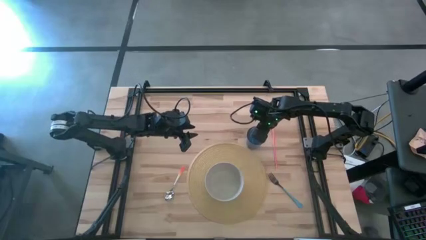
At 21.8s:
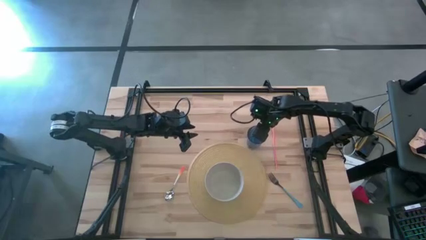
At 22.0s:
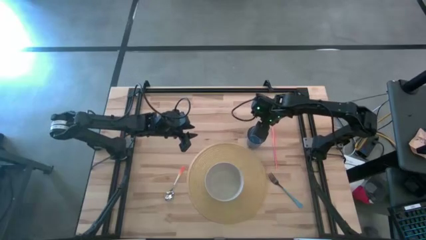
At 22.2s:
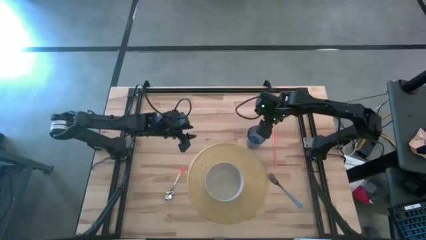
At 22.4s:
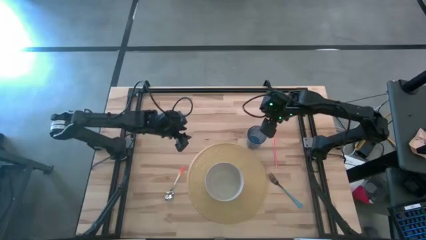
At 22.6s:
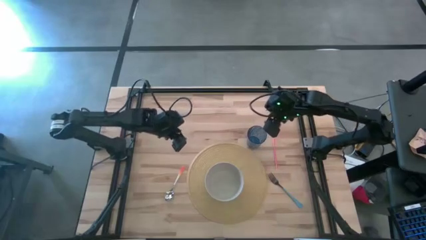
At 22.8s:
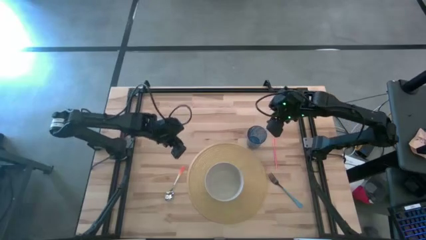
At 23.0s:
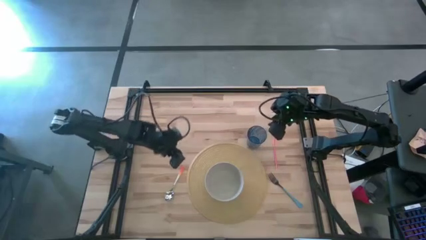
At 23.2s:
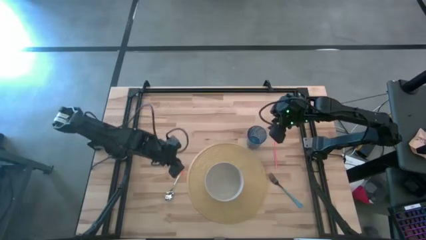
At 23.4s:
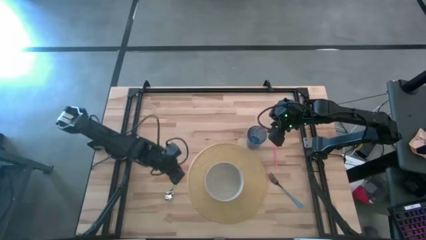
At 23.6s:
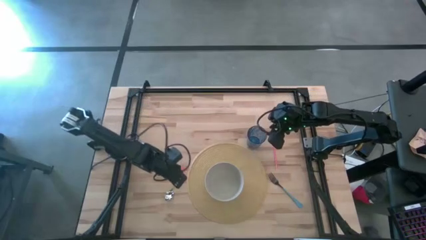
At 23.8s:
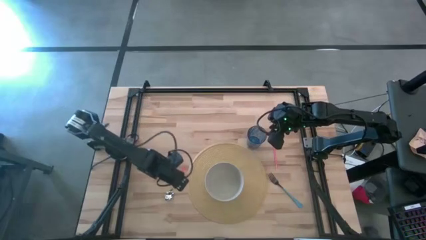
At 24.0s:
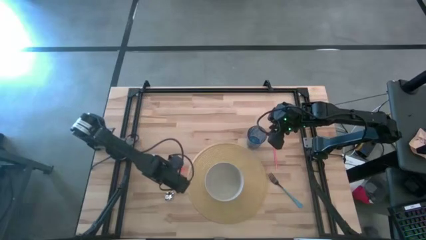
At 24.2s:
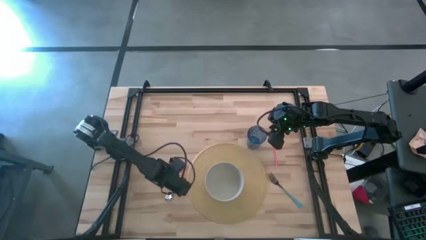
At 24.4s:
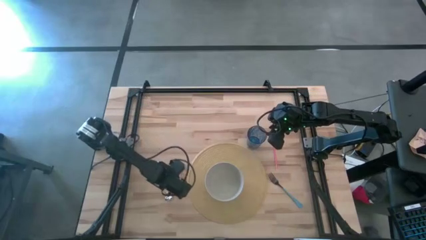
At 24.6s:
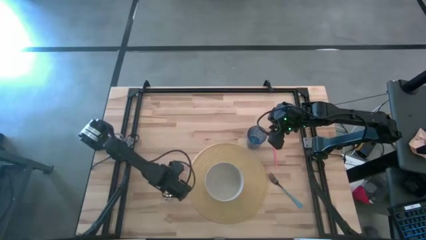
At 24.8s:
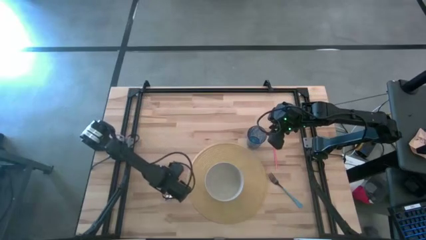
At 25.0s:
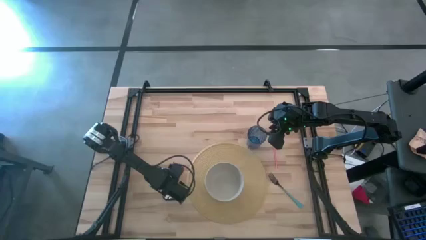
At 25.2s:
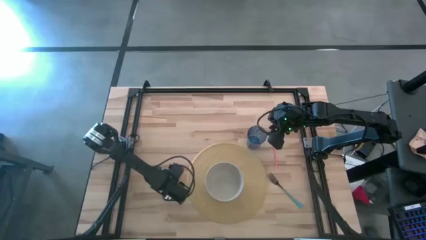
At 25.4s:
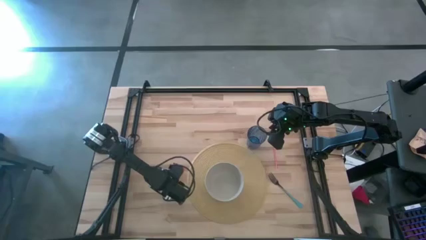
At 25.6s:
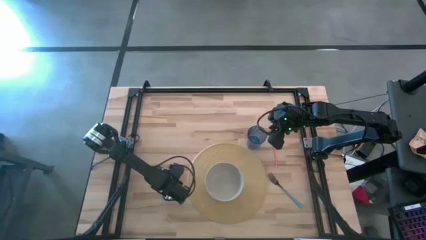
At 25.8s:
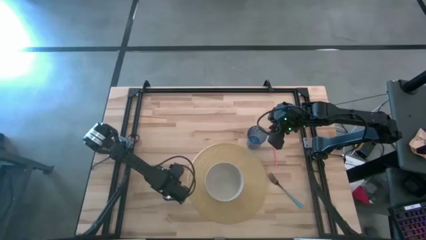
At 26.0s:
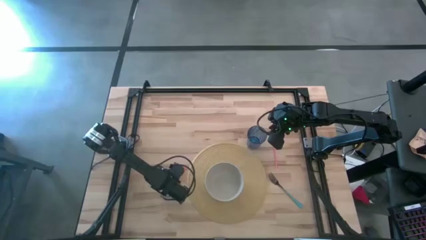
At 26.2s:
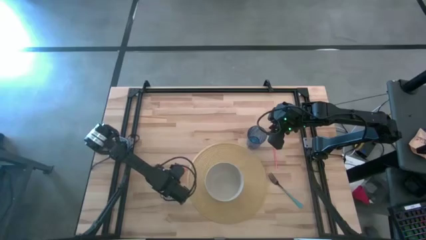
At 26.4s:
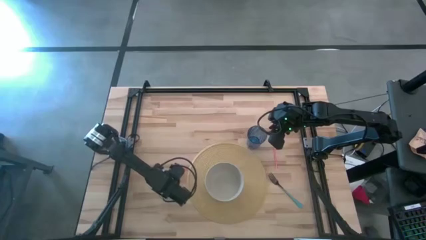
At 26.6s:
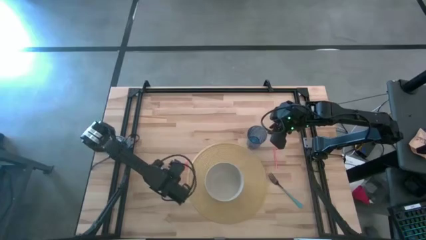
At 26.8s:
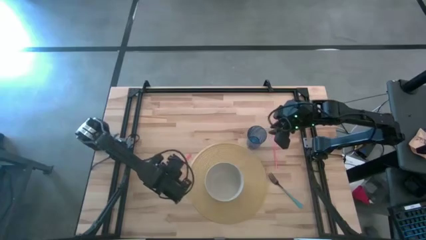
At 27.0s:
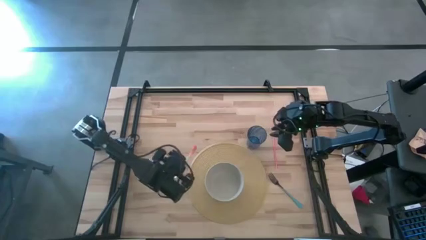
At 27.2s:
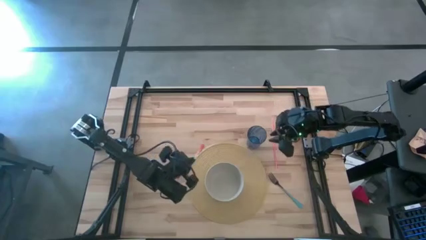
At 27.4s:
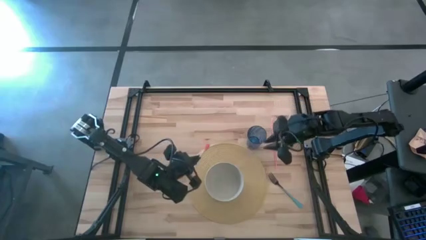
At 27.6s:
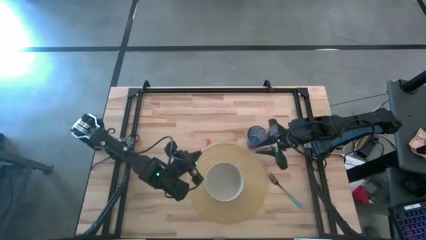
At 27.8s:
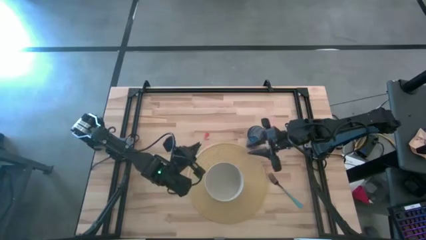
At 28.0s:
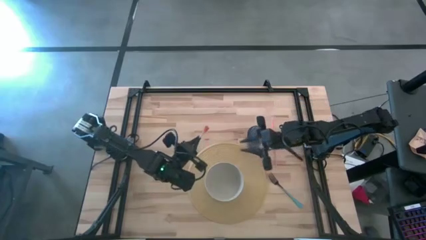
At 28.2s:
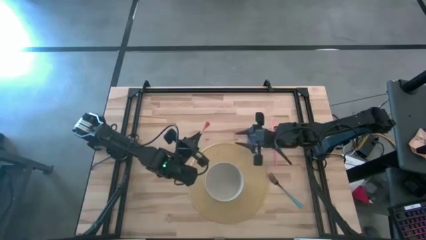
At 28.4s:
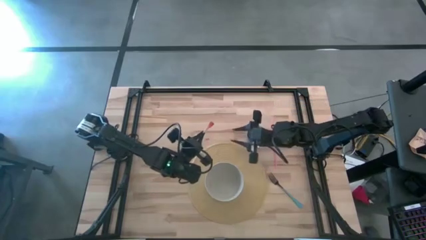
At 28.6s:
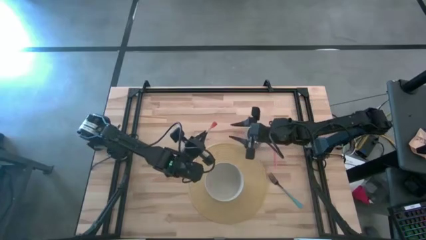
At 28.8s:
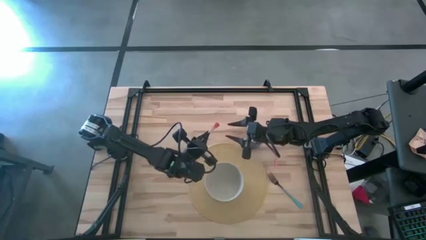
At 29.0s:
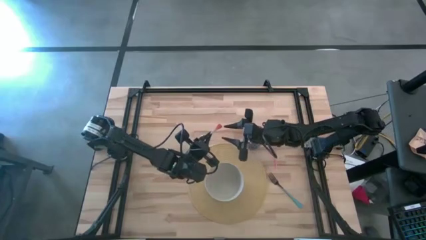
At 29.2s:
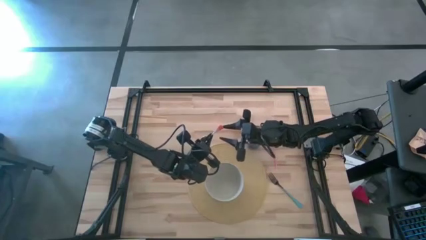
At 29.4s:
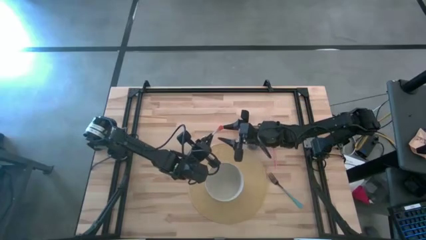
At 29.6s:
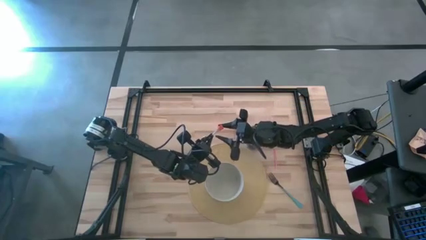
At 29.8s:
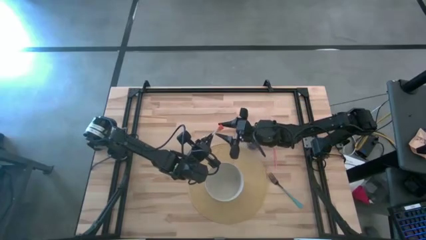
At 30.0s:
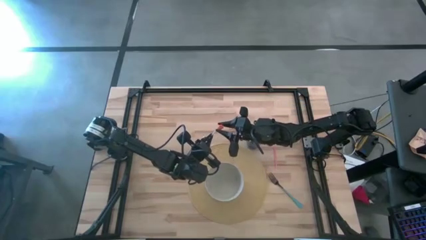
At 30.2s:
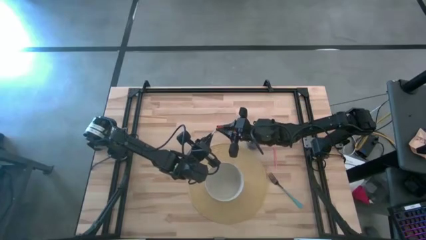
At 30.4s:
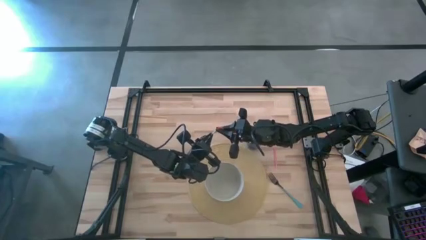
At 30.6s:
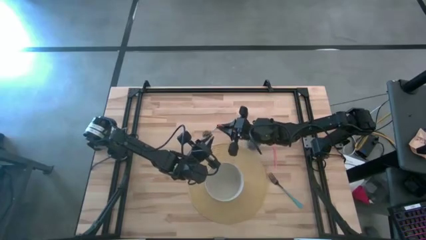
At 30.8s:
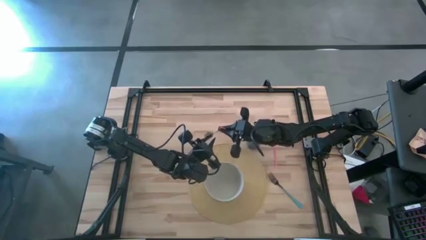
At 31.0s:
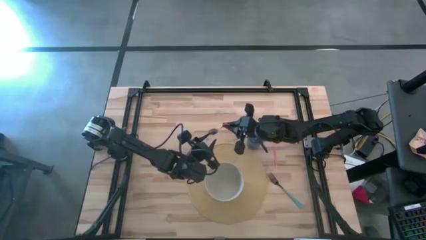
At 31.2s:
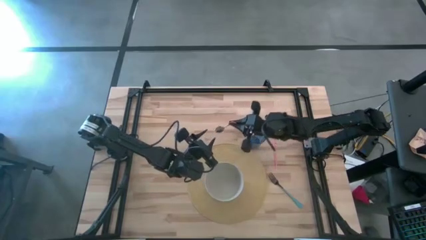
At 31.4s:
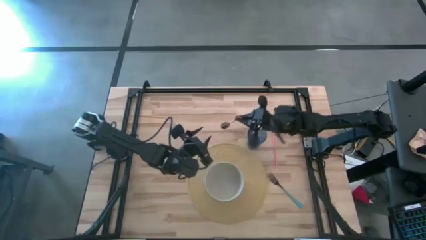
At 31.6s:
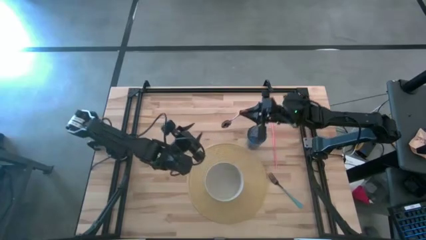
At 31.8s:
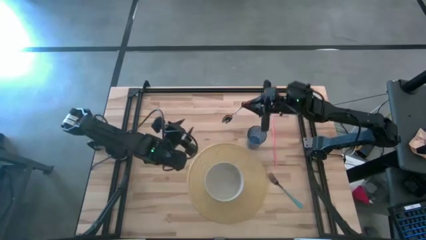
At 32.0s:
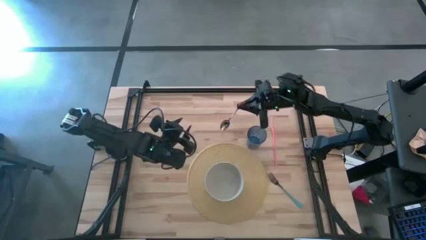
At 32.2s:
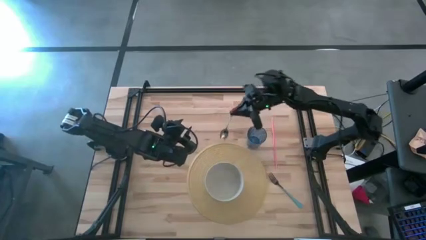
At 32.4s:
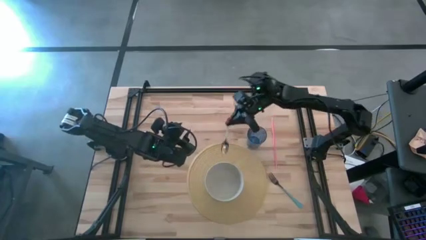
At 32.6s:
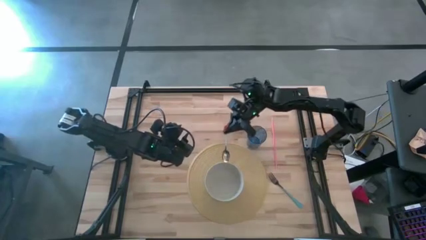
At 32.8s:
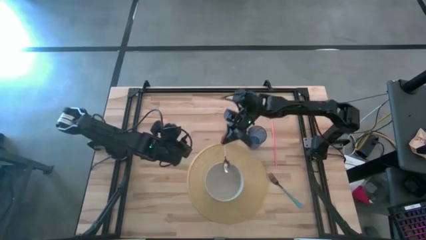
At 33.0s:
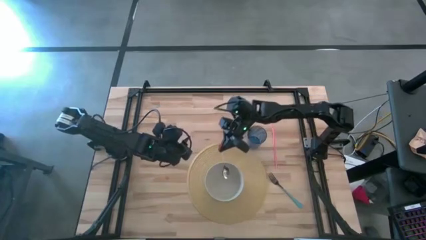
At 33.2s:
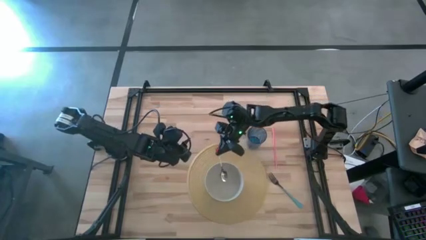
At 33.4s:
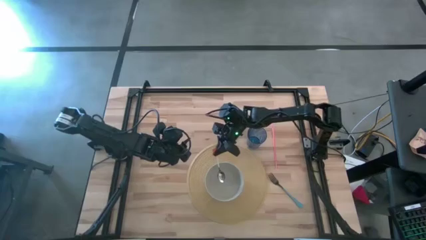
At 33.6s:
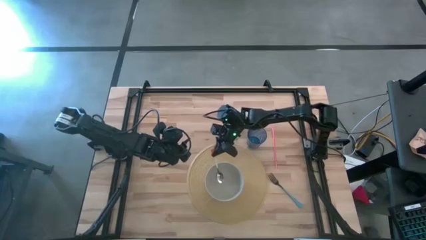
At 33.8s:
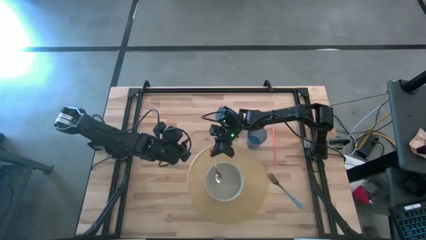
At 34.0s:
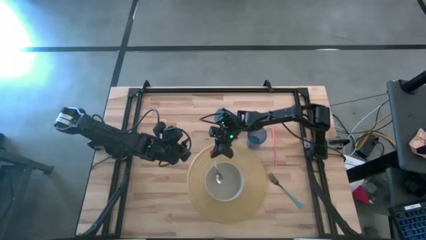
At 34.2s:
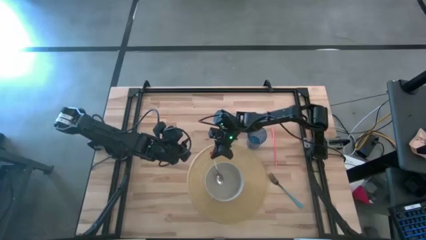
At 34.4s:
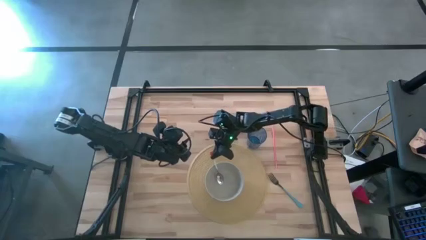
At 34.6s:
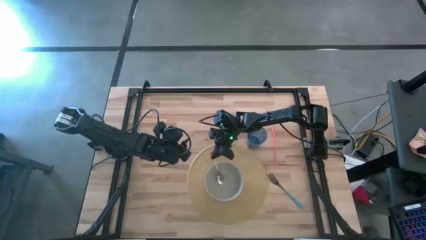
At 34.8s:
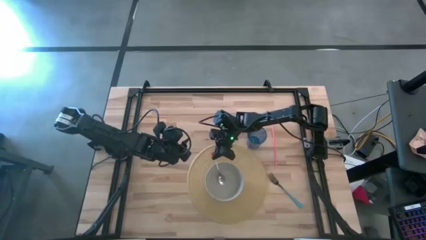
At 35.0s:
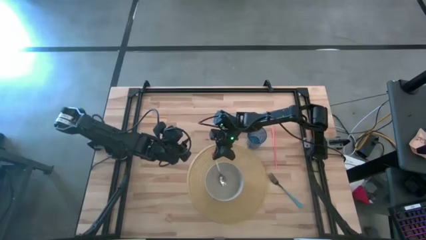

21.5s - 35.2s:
Task: Pick & Place Utensil
Put the orange spoon into the white bowl on the brown placemat

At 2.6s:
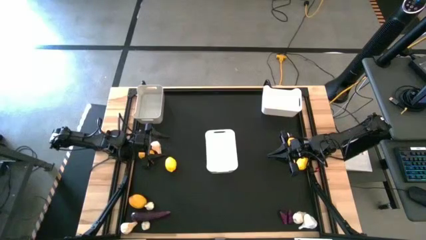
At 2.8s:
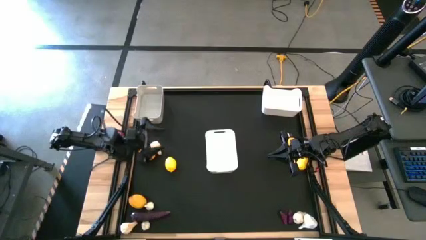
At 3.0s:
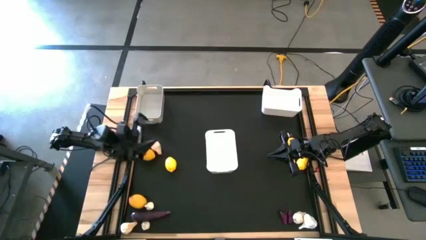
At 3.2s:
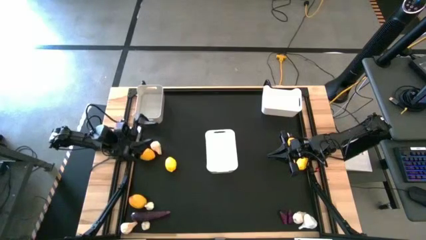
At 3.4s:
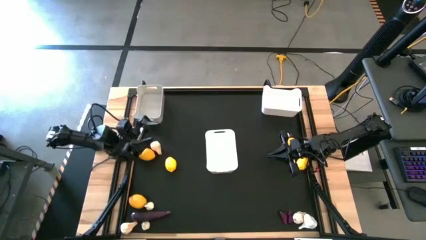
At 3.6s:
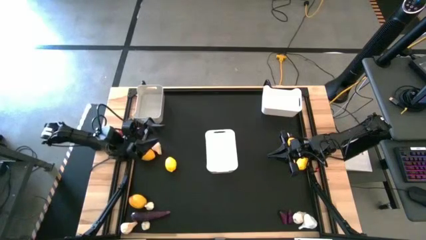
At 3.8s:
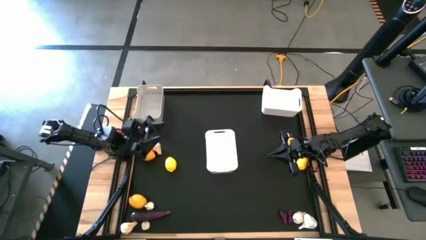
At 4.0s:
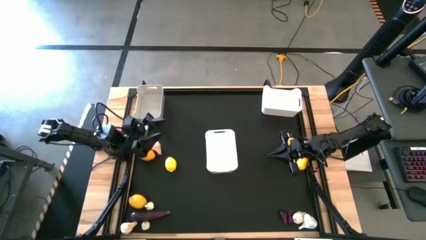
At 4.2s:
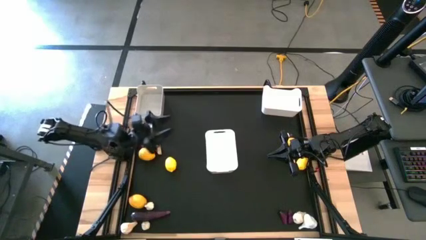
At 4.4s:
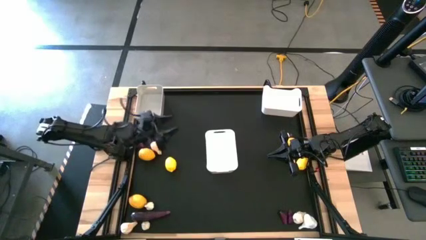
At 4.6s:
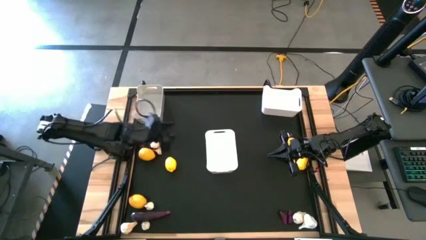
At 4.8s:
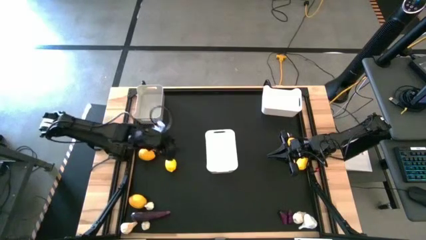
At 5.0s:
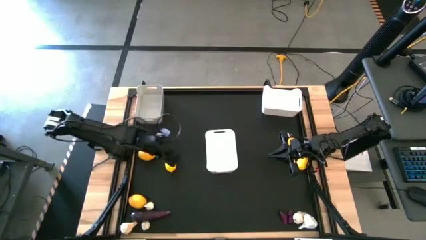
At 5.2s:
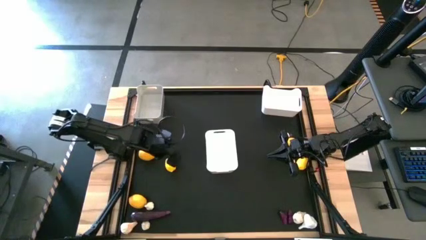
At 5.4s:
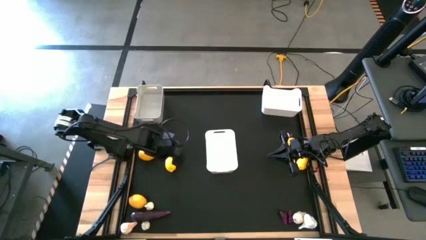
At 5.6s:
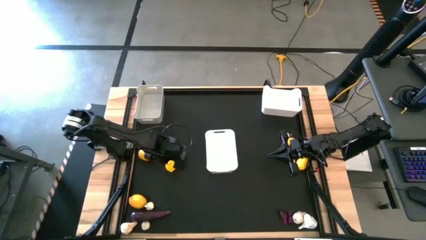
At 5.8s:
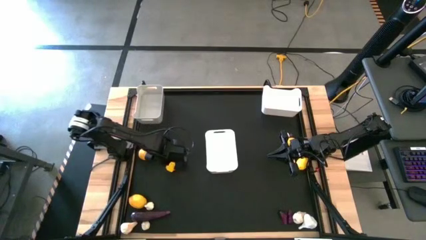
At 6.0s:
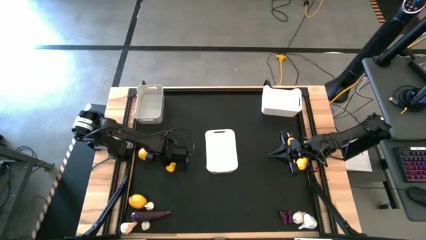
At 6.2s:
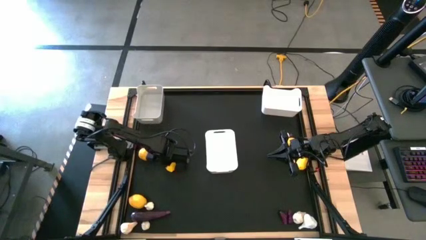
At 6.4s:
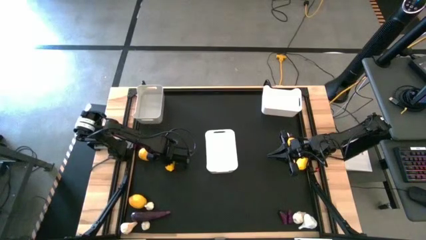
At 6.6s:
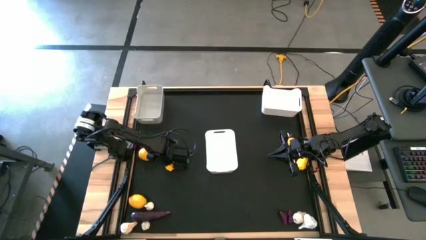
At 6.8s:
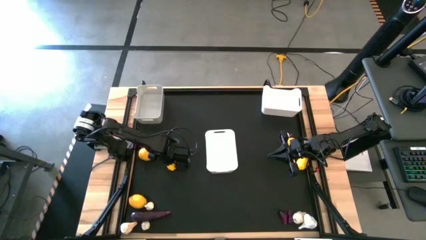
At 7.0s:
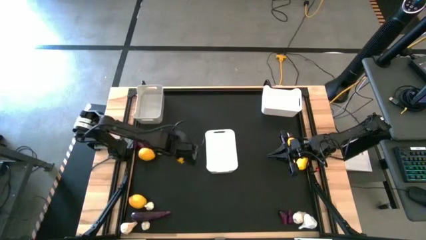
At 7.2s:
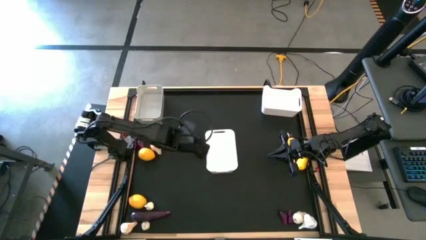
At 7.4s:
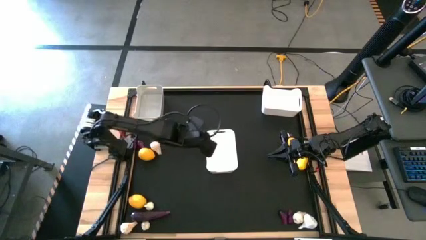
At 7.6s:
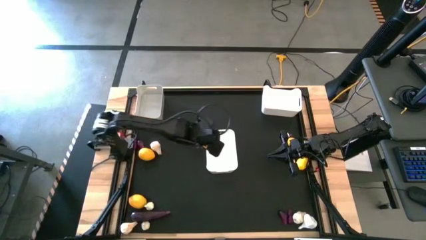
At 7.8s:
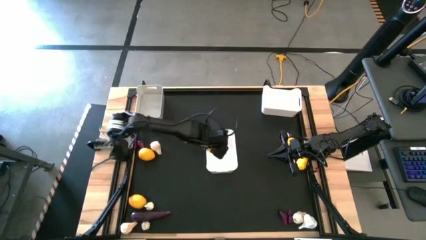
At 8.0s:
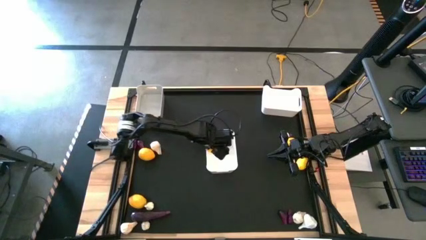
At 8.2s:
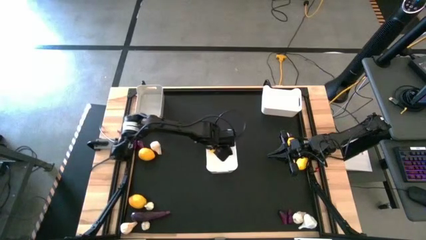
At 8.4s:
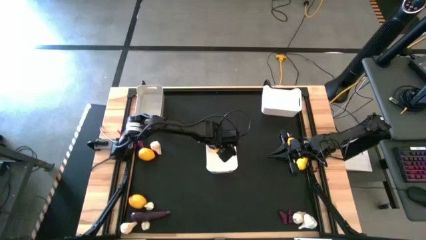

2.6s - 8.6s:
Task: Sort produce into baskets
Put the lemon into the bottom white bin
